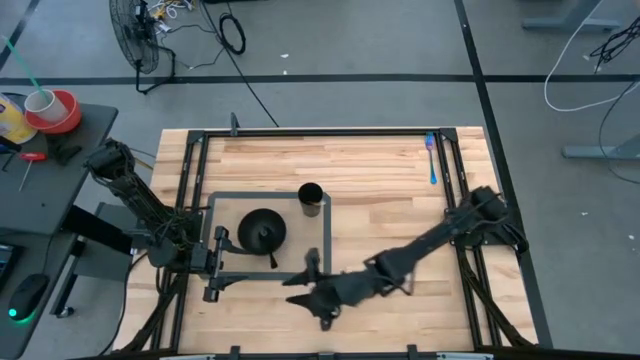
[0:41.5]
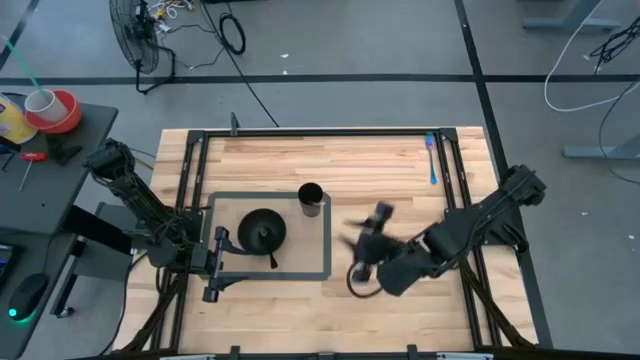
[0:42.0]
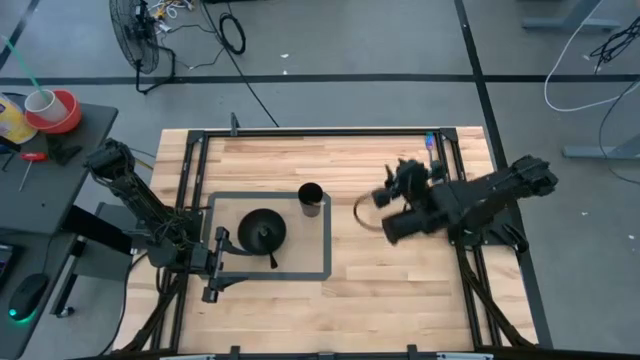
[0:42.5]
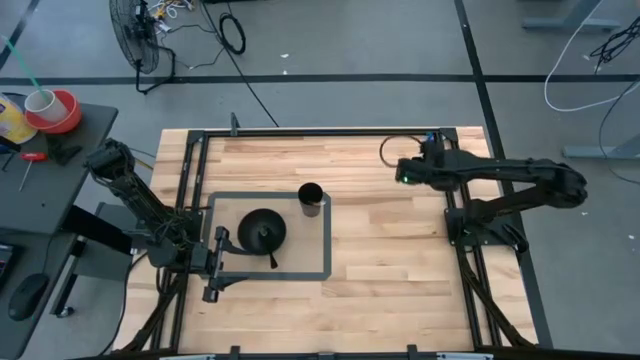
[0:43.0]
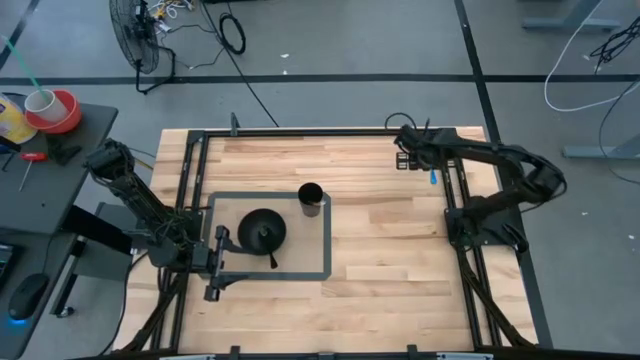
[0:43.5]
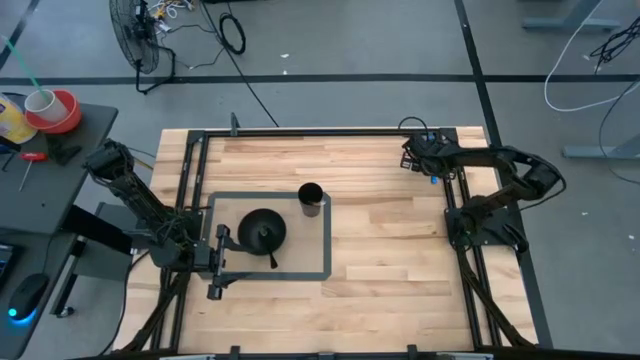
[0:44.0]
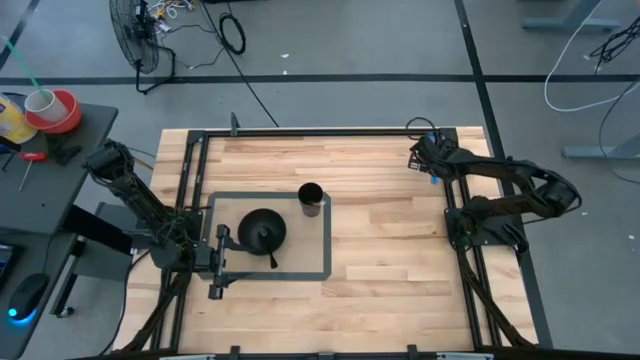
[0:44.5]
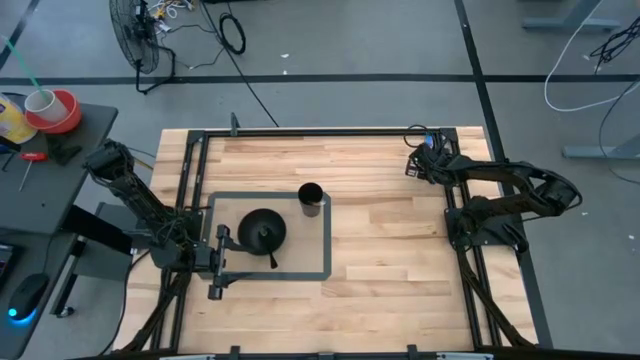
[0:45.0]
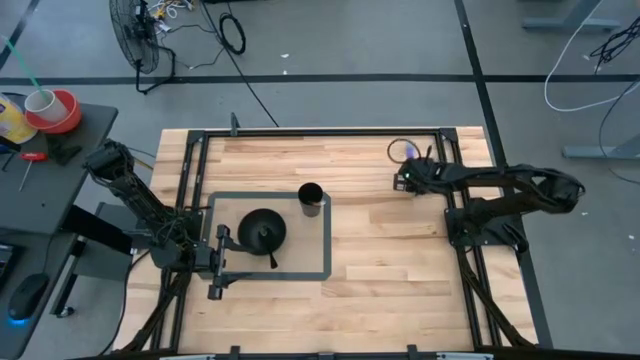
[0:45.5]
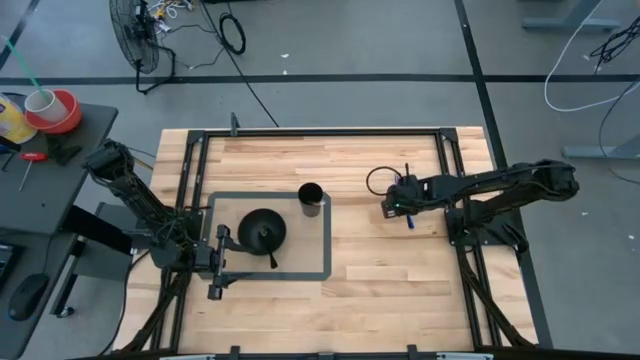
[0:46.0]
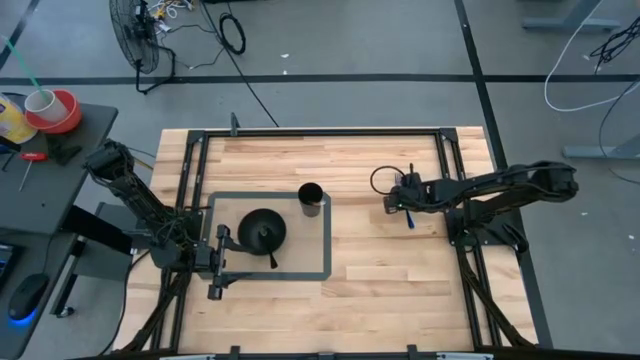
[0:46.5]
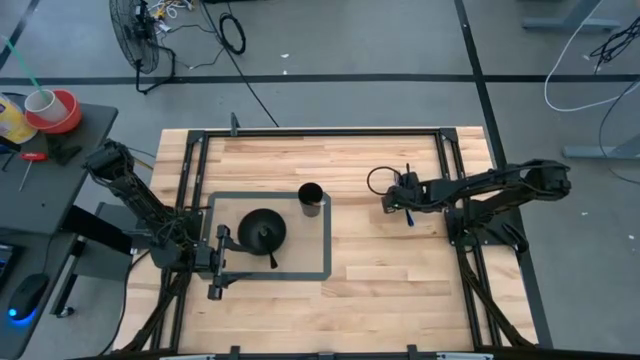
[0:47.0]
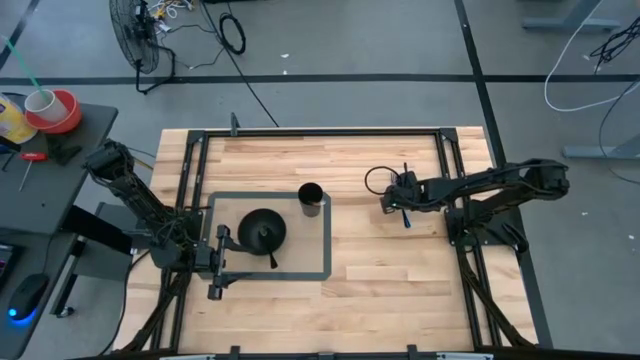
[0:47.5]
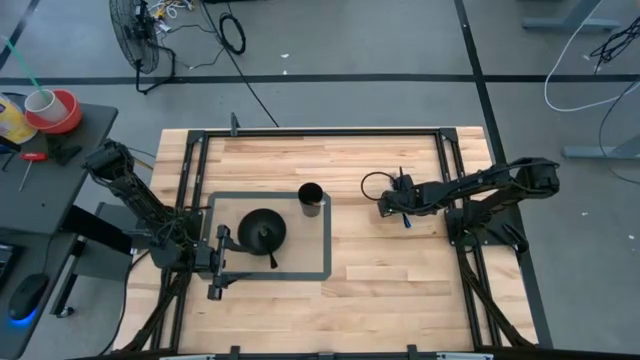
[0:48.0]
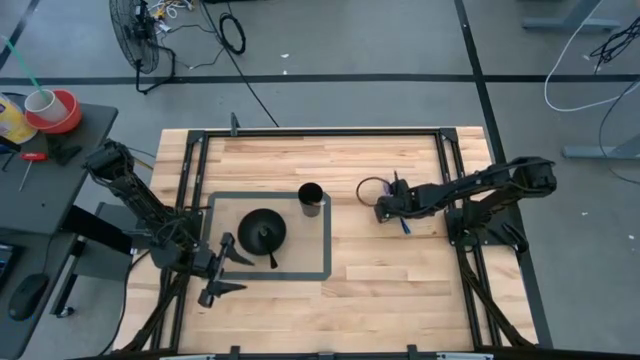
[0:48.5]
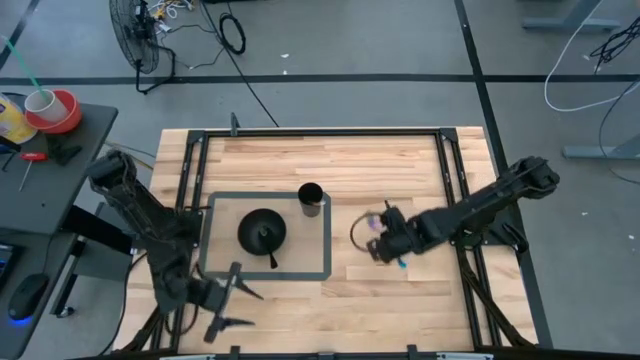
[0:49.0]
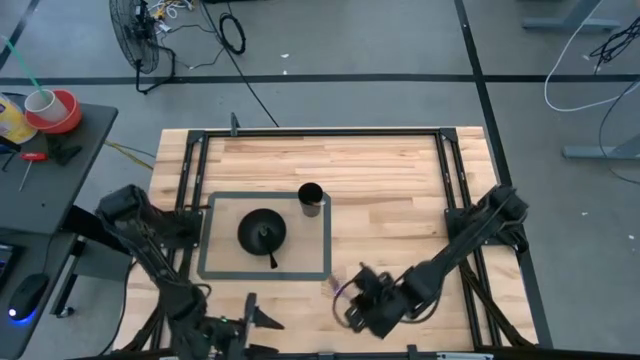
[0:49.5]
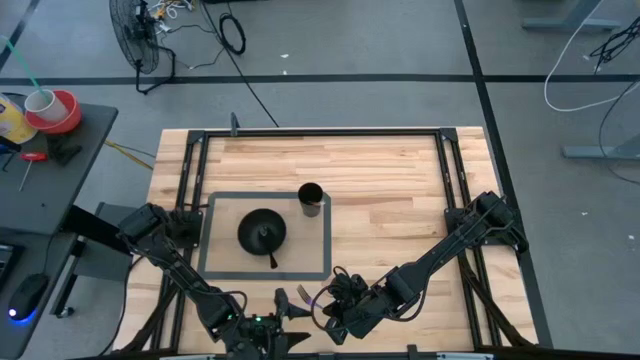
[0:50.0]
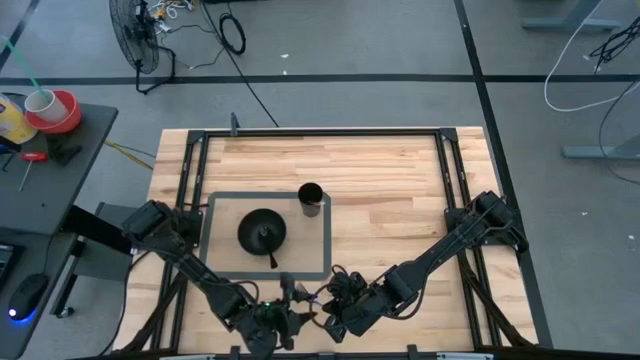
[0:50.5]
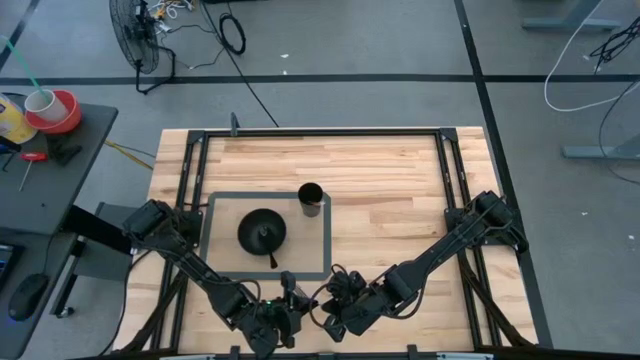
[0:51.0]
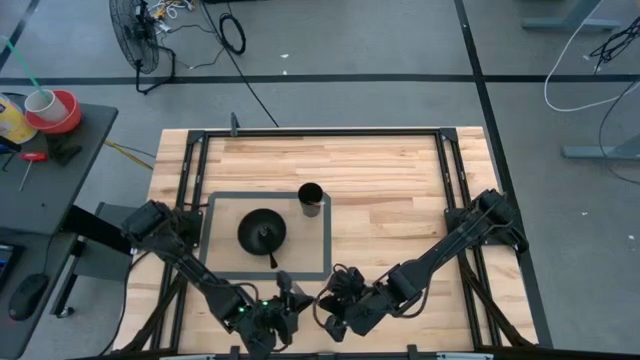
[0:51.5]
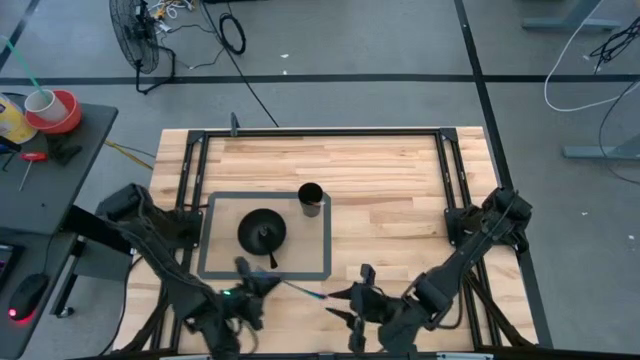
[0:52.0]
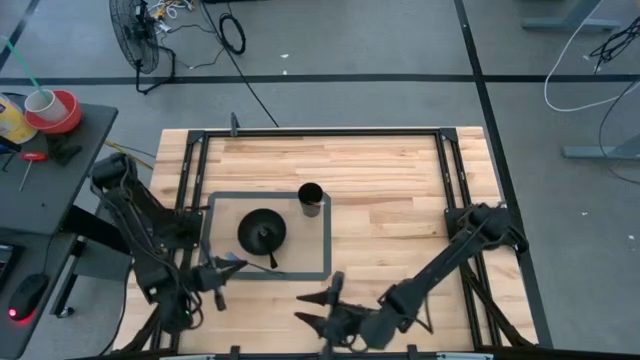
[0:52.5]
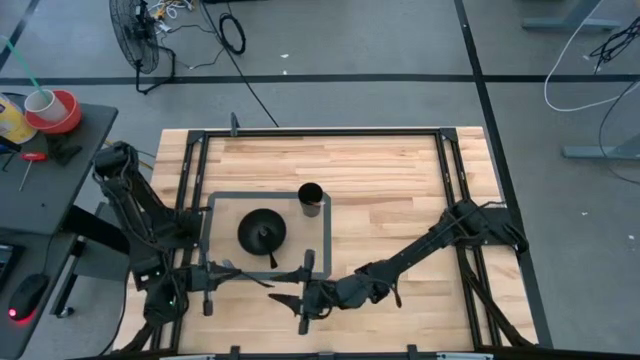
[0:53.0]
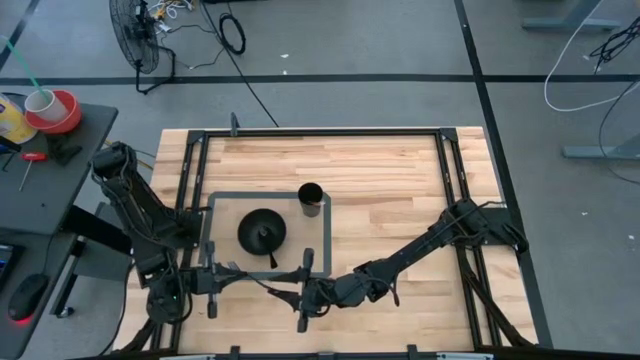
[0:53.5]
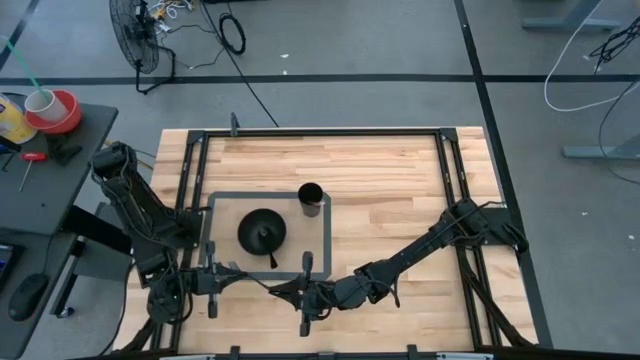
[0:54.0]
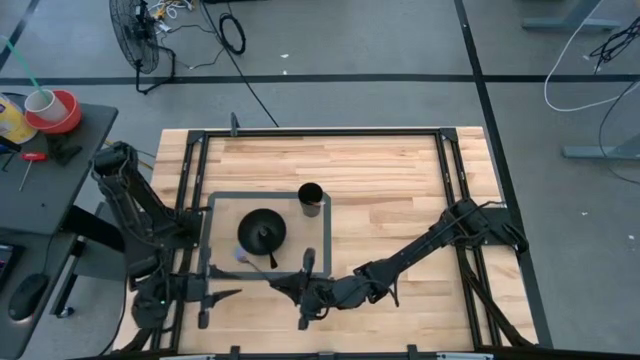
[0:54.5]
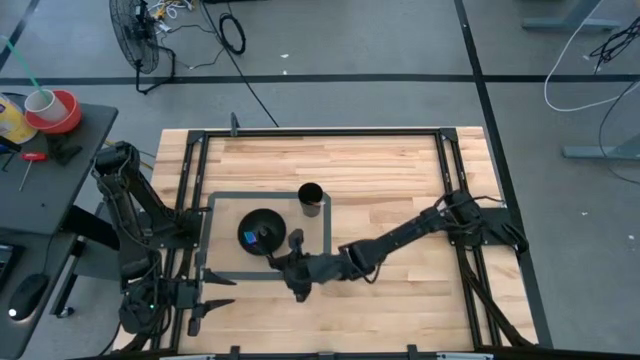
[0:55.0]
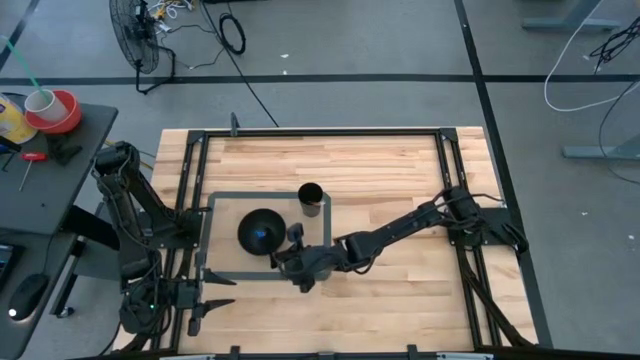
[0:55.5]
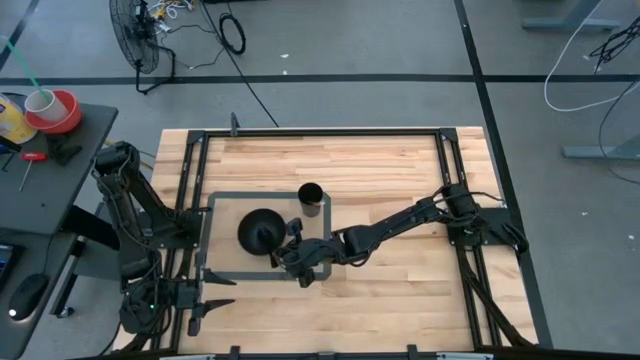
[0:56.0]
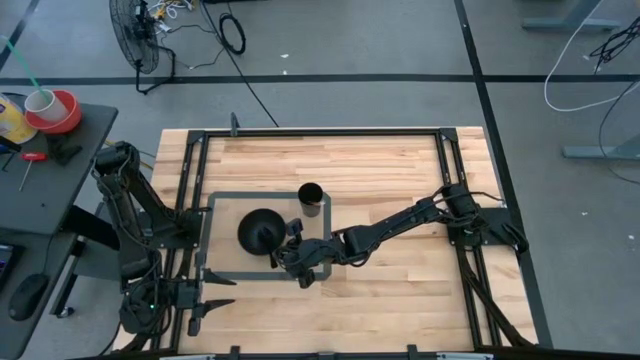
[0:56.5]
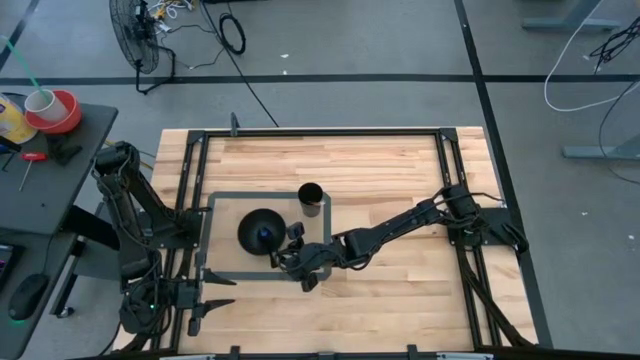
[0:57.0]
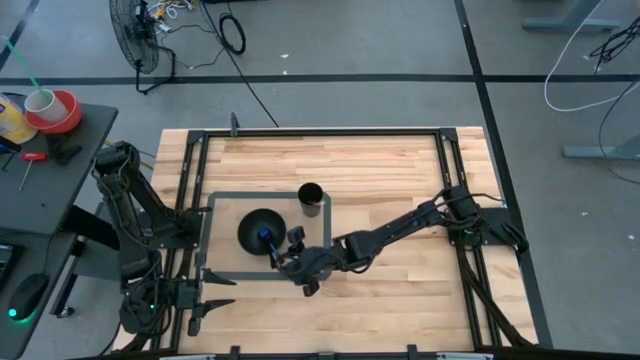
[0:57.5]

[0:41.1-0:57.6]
Task: Pick & Place Utensil
Put the blue fork into the black bowl

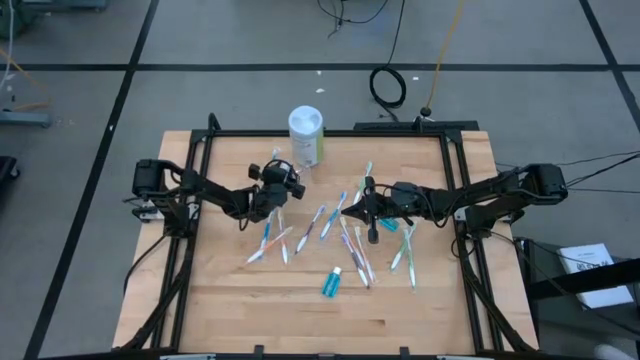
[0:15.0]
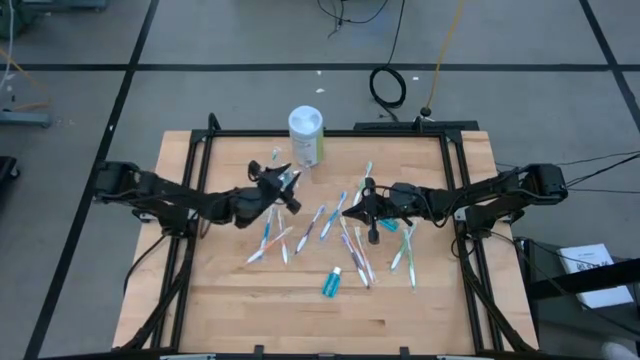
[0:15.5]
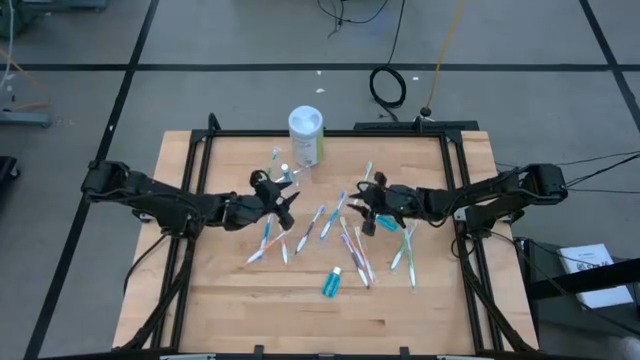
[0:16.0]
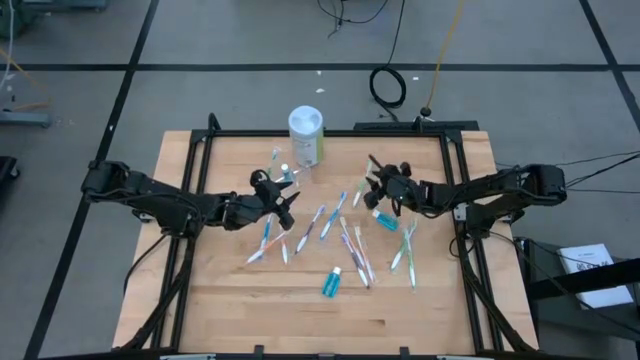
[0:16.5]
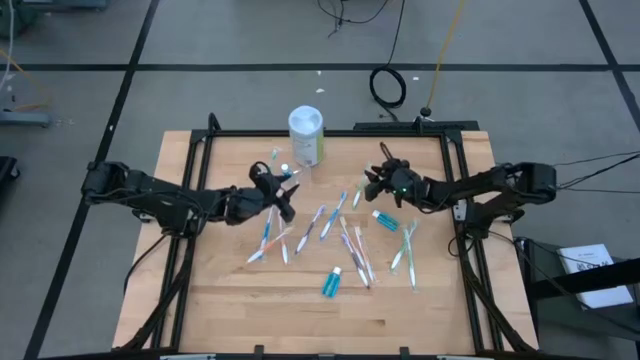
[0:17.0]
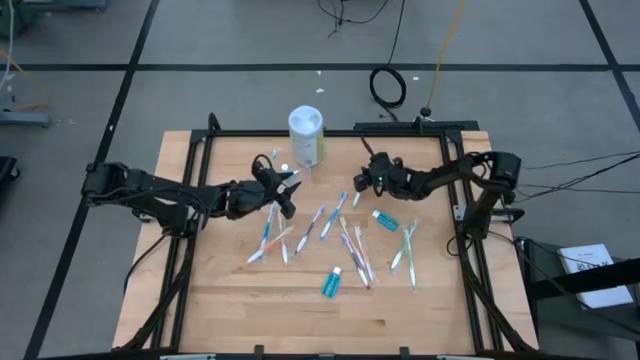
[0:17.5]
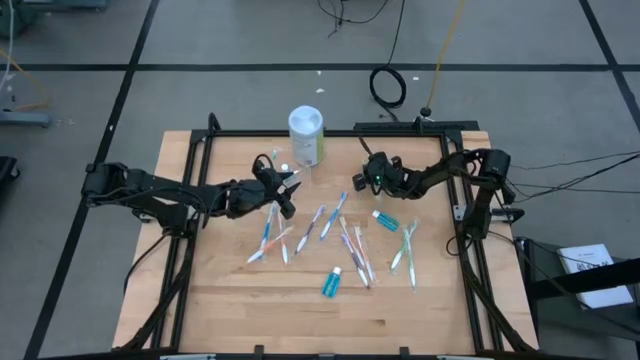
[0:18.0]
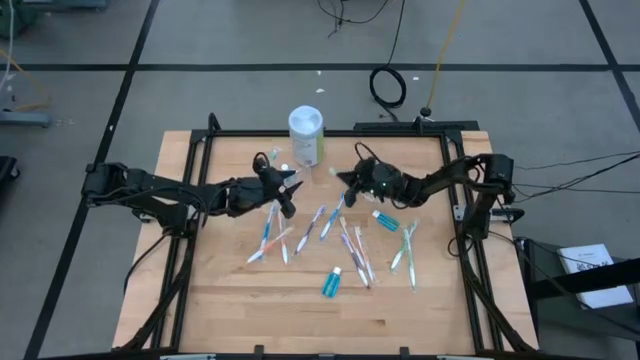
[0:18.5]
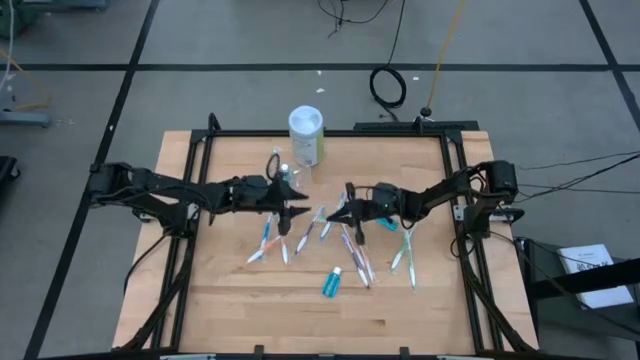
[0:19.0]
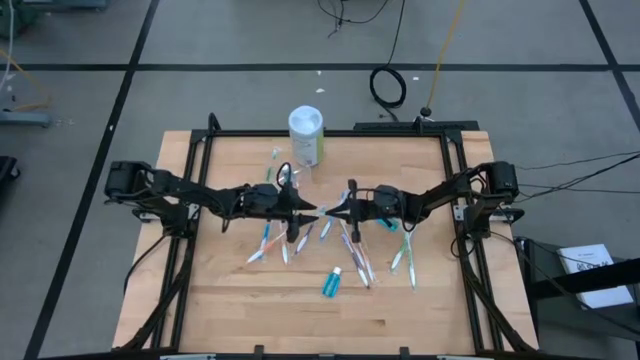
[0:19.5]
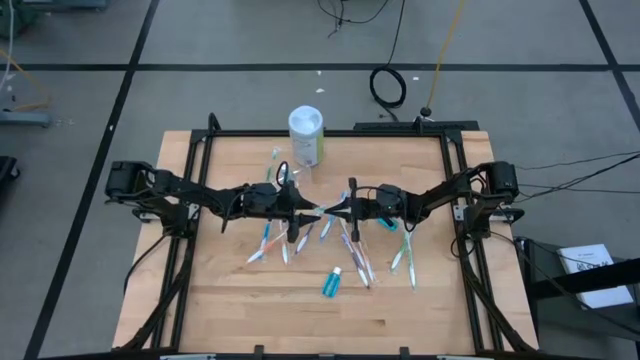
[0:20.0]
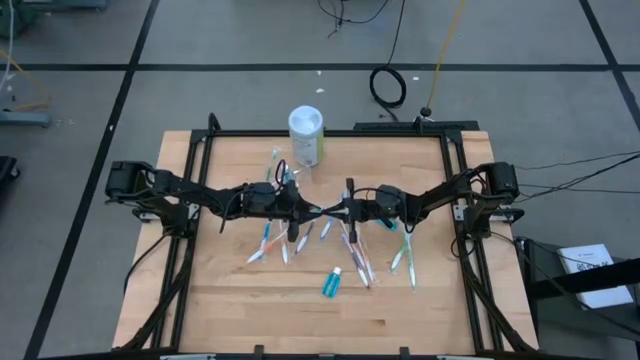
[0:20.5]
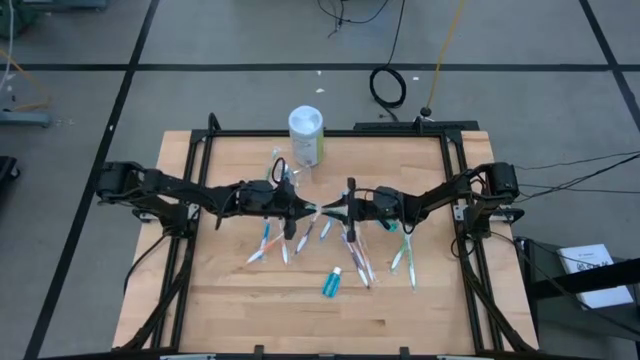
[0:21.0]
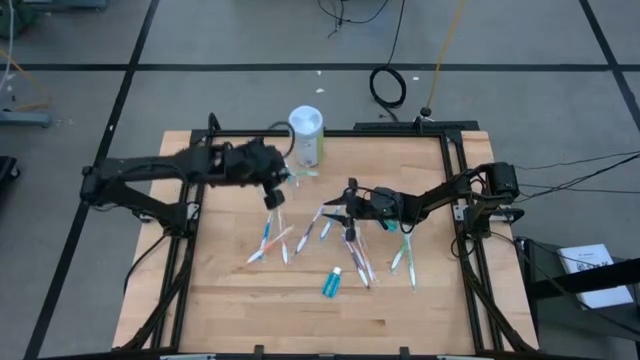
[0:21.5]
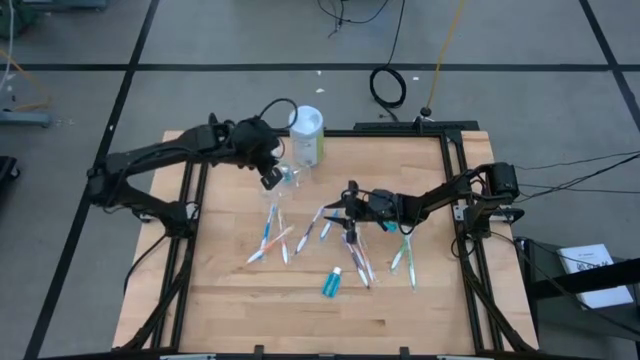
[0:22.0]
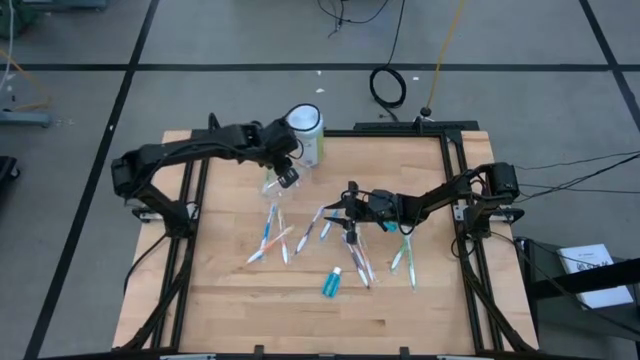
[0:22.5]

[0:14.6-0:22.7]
Task: Pick & Place toothbrushing station
Put the green toothbrush into the transparent organizer
